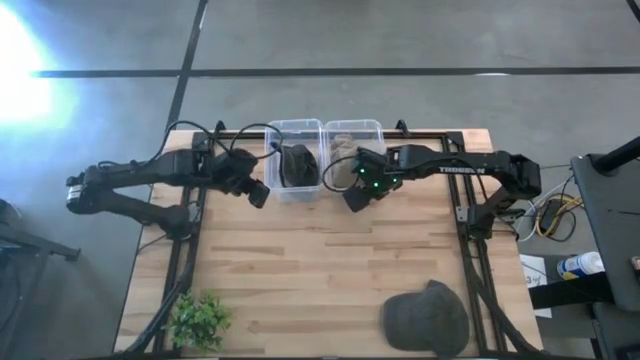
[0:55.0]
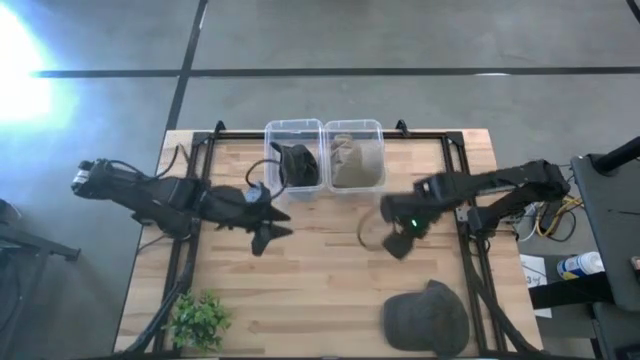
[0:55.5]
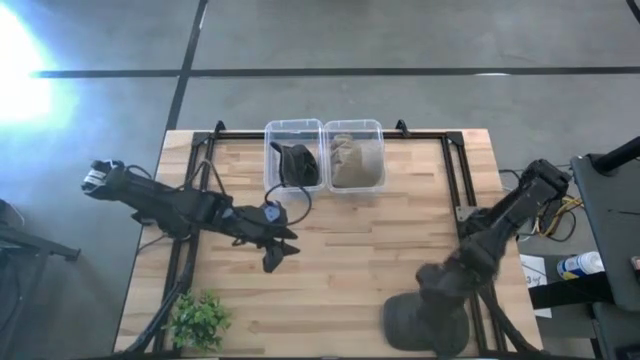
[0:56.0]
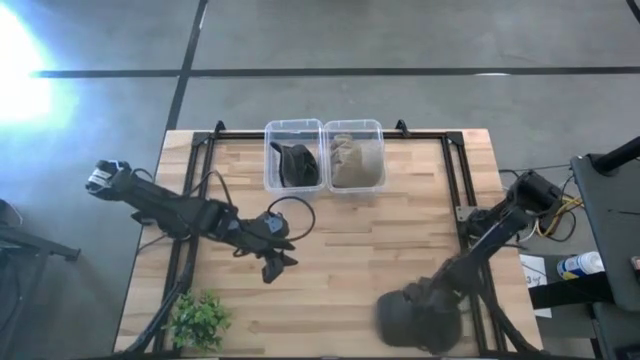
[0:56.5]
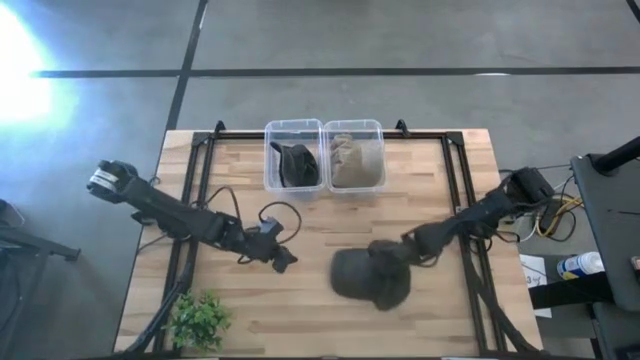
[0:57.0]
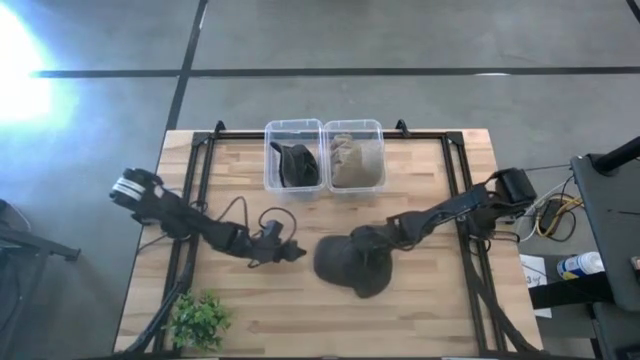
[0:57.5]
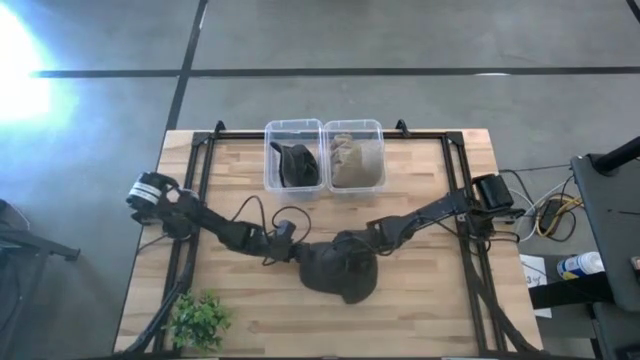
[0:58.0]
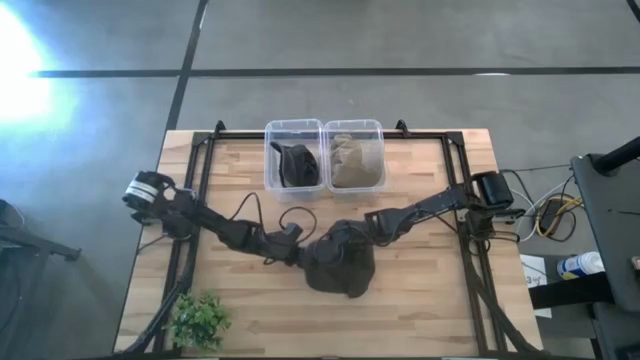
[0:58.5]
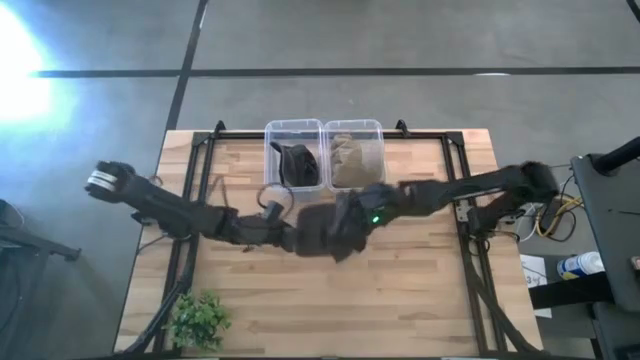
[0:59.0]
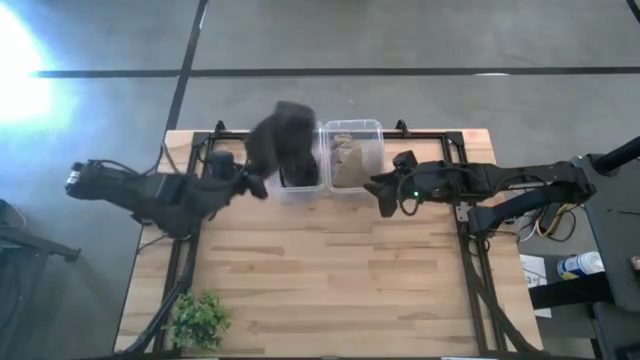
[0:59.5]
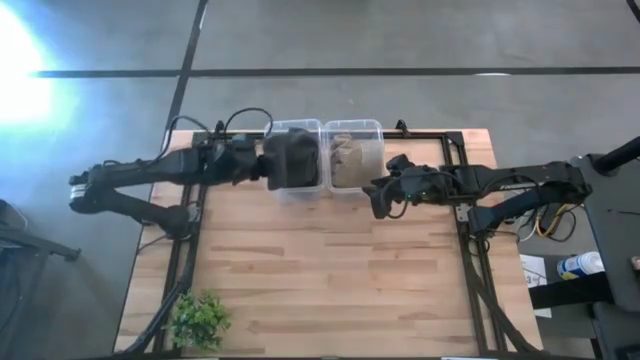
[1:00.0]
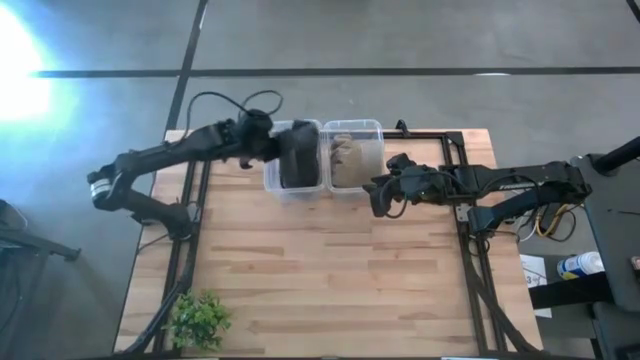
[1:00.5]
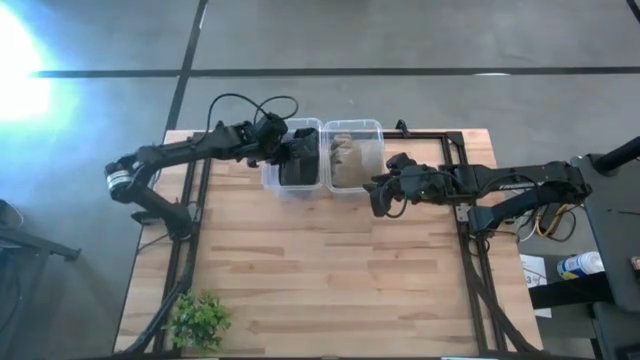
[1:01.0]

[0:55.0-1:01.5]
Task: Pick & Place hat
Put the dark gray cap into the left transparent bin

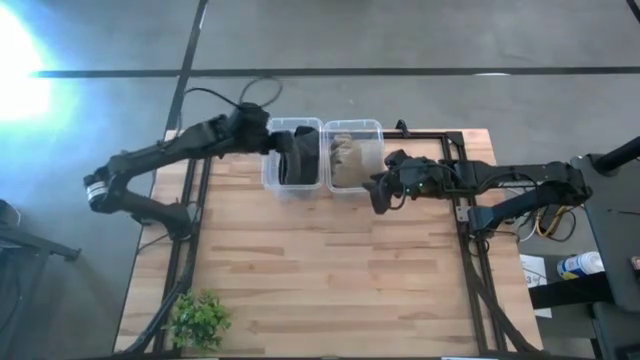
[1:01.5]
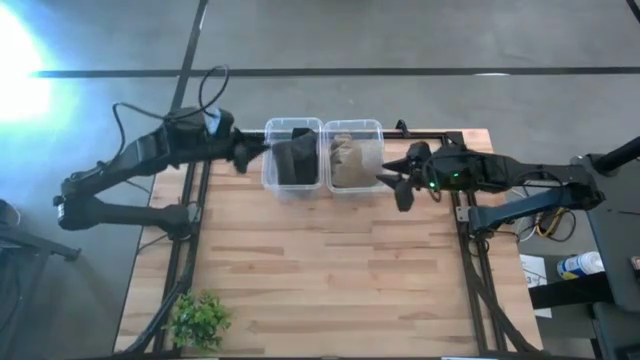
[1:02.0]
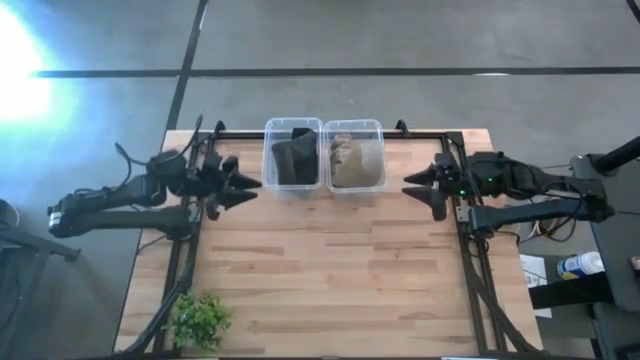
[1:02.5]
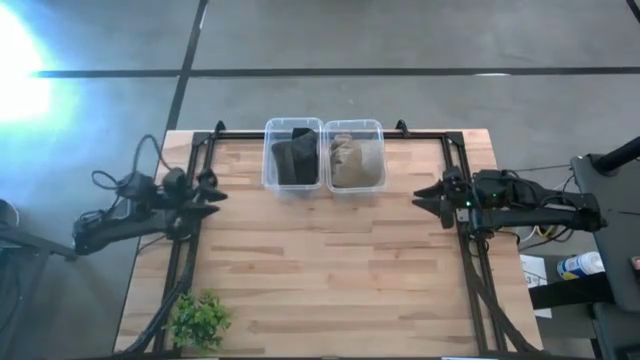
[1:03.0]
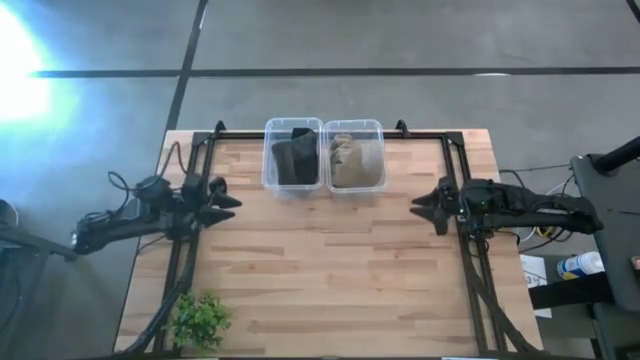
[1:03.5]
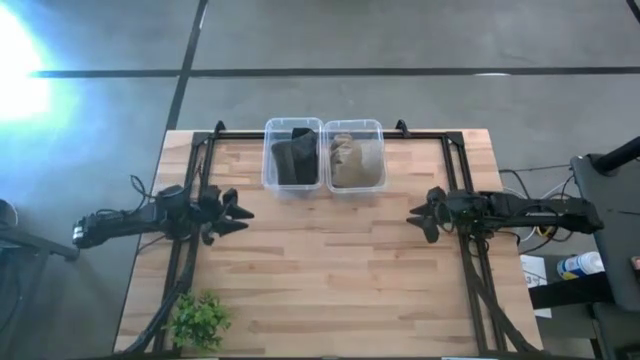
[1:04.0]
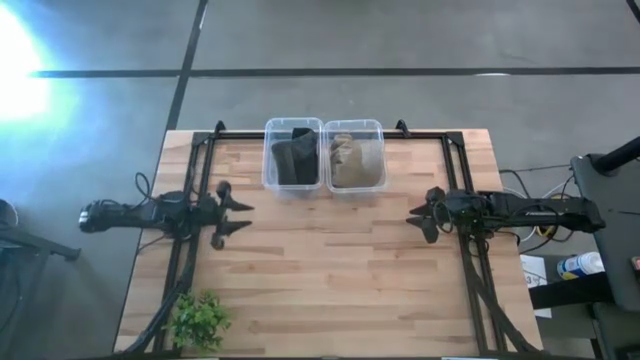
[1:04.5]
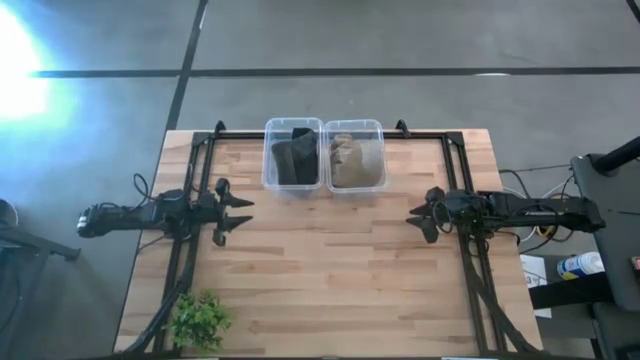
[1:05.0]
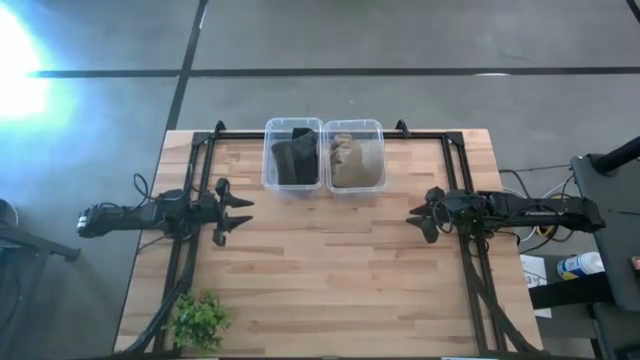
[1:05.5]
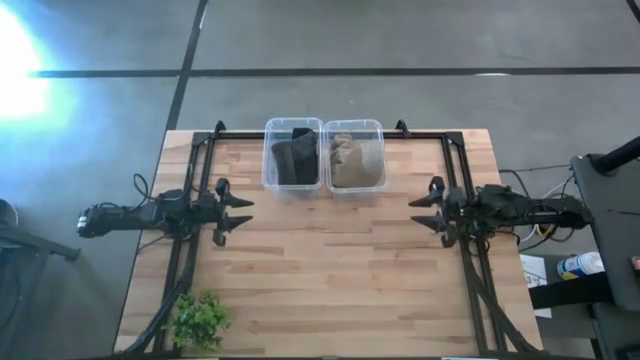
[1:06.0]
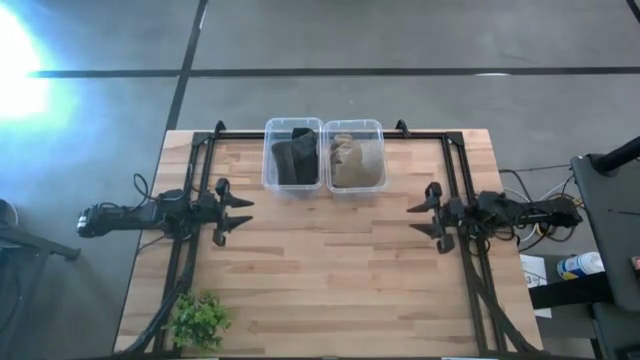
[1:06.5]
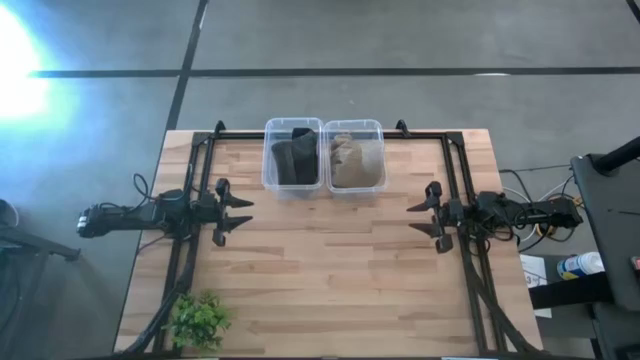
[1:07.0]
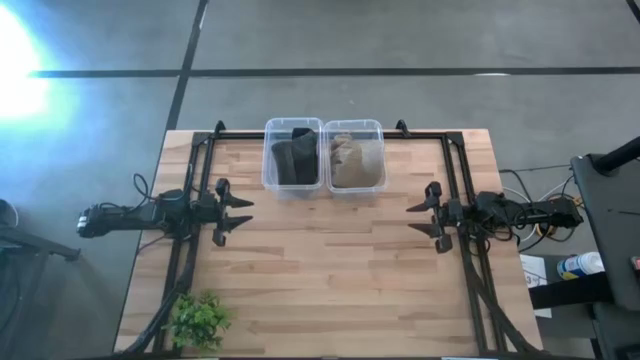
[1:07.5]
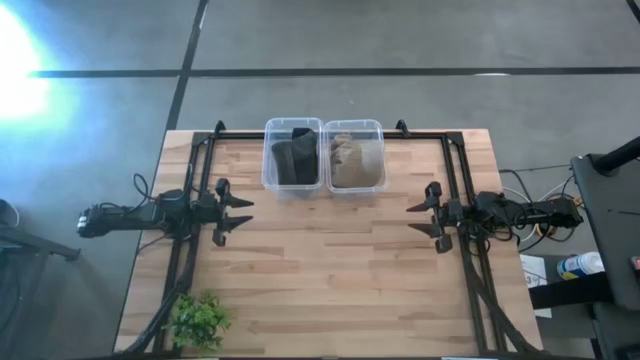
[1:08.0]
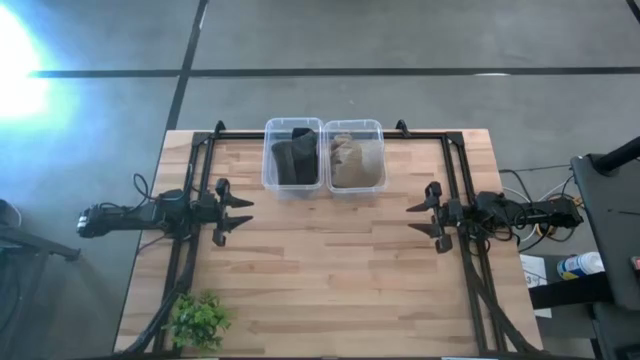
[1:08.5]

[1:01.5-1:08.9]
Return to Home Position

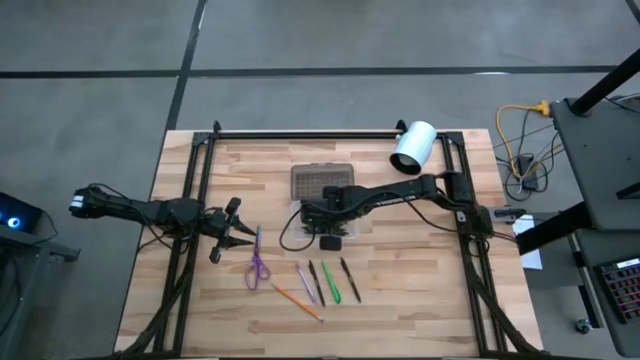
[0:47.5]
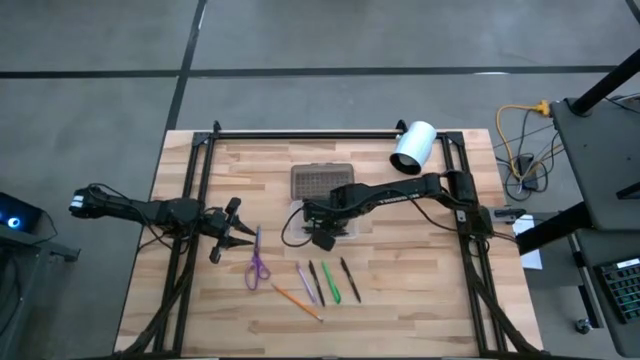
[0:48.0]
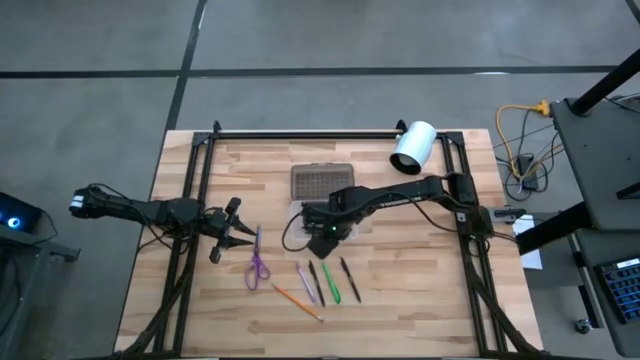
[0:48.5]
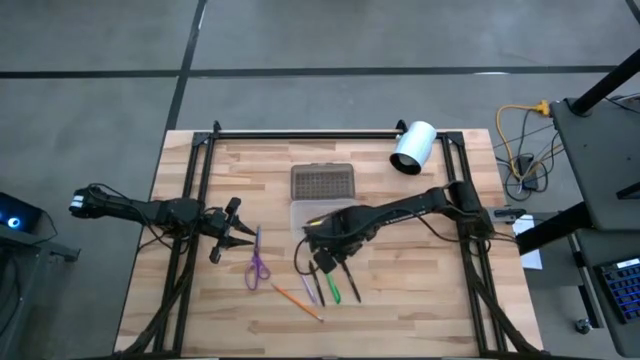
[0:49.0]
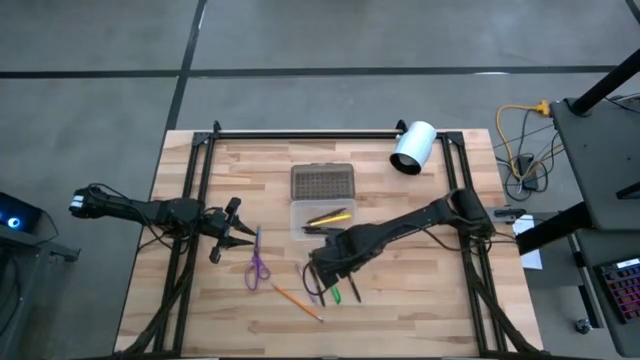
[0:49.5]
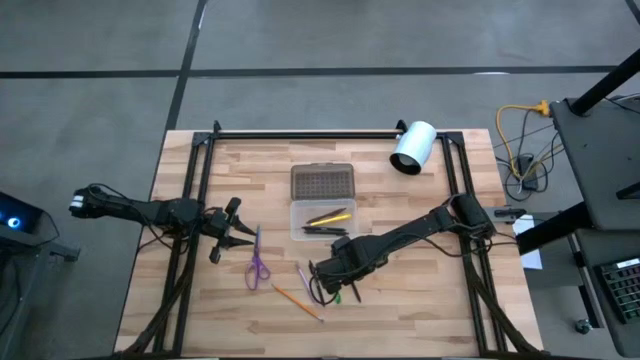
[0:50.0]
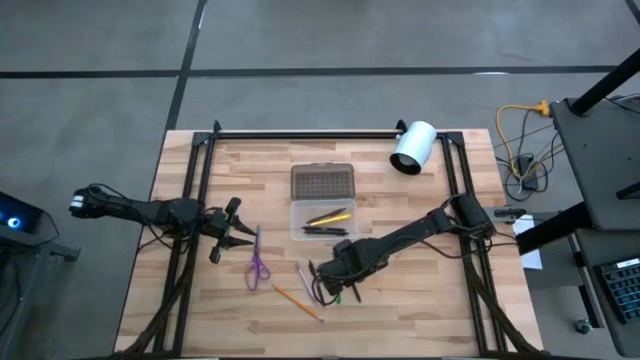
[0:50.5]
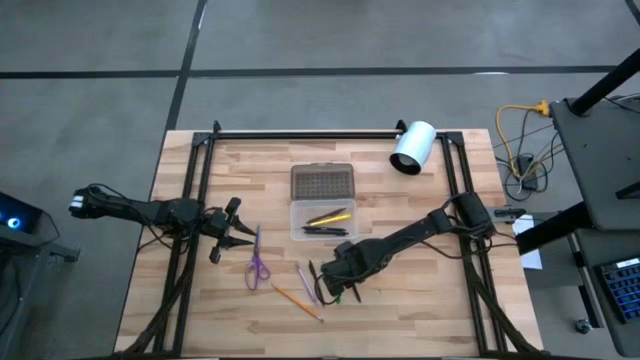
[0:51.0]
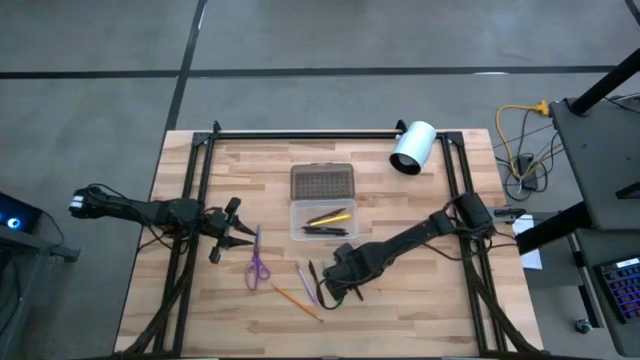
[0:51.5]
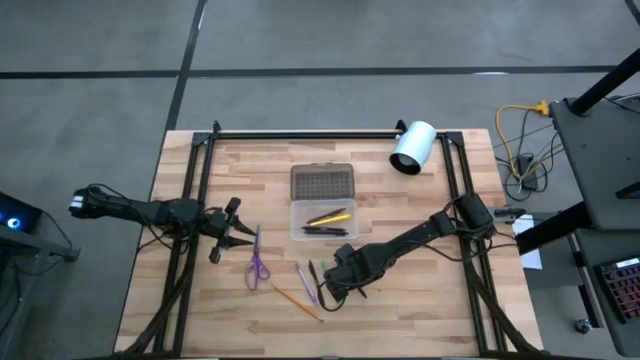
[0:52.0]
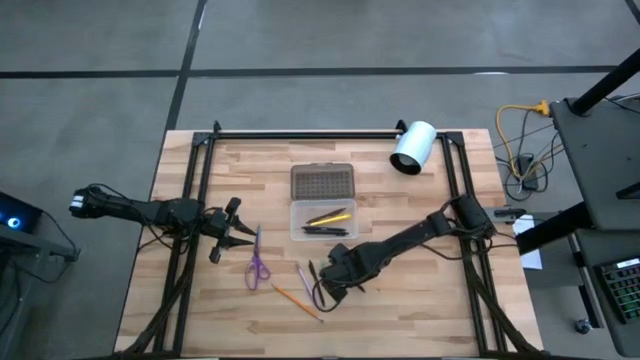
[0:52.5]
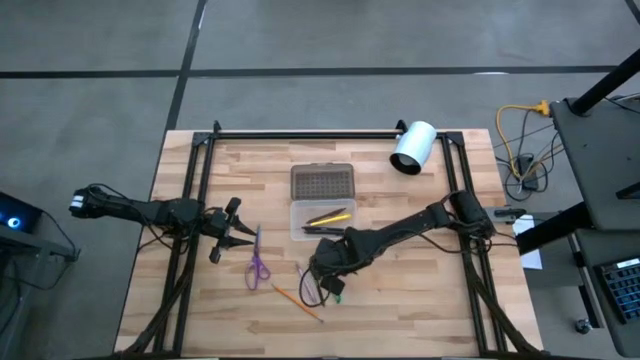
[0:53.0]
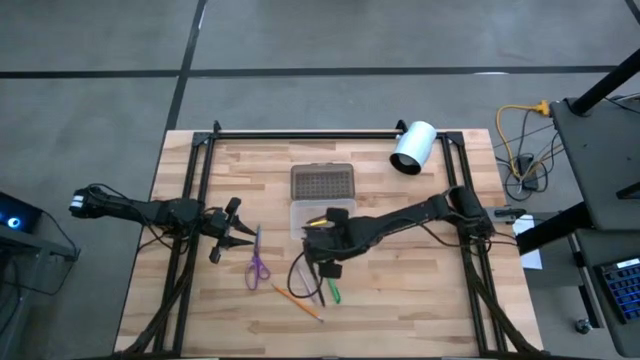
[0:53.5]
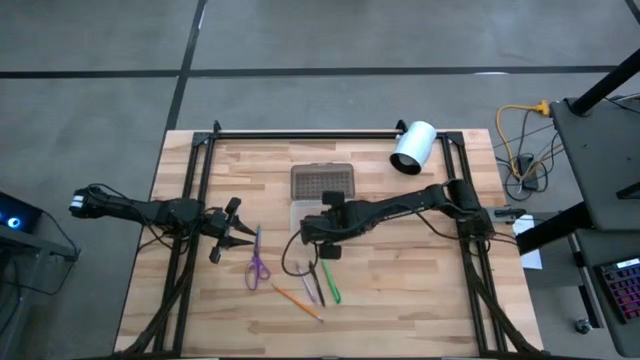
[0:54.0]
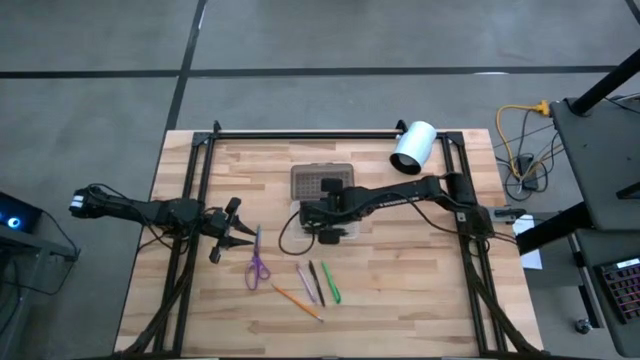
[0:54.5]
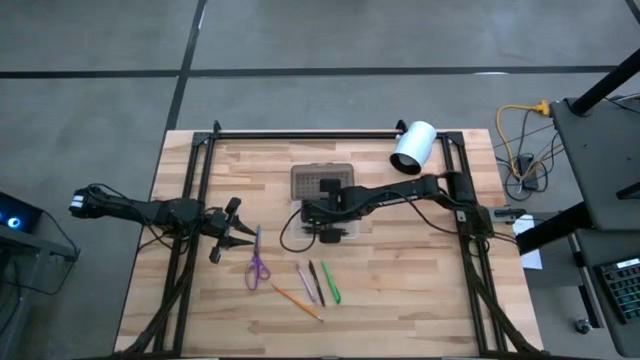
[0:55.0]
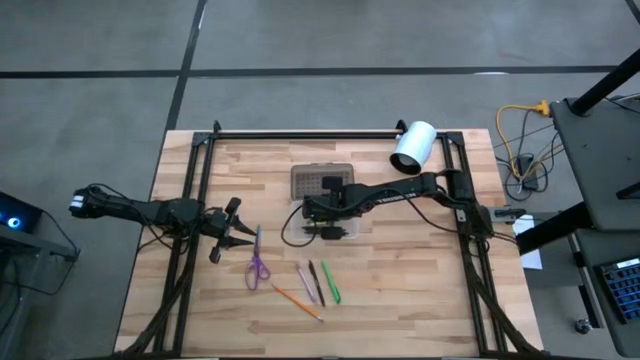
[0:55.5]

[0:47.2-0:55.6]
Task: Pick & place school supplies into a supply box
Put the black pen into the supply box
